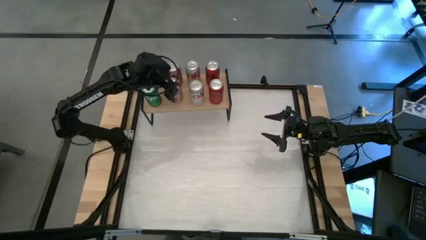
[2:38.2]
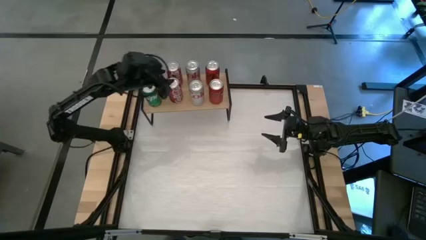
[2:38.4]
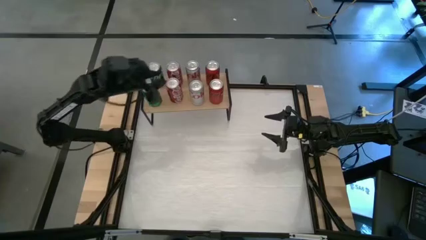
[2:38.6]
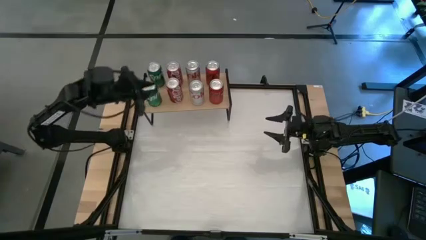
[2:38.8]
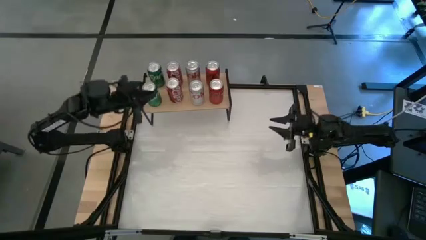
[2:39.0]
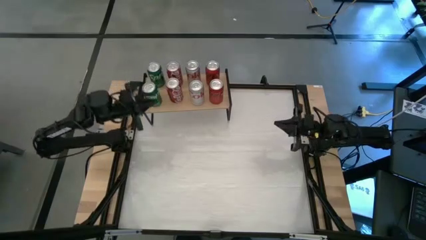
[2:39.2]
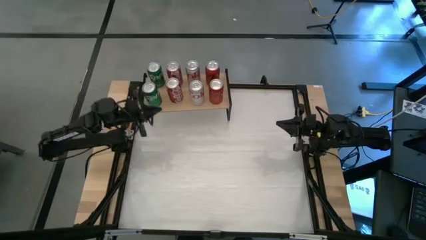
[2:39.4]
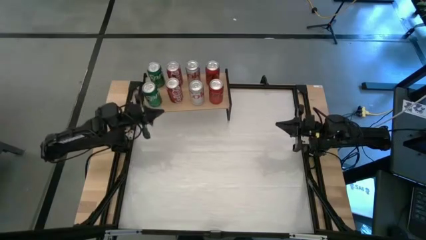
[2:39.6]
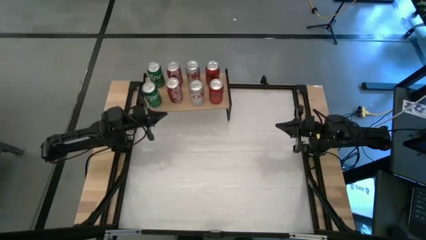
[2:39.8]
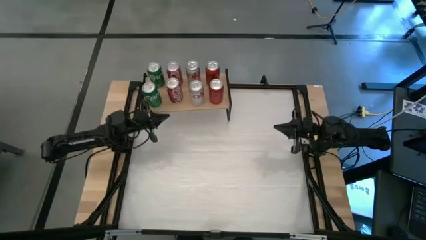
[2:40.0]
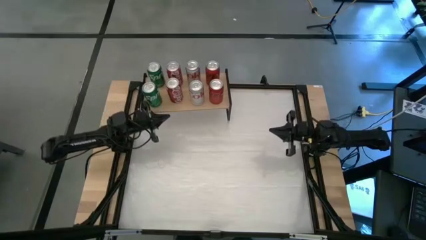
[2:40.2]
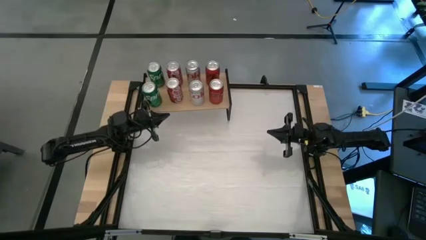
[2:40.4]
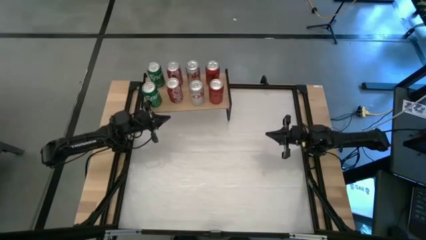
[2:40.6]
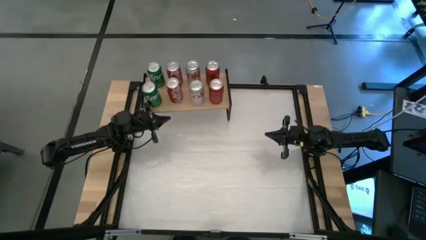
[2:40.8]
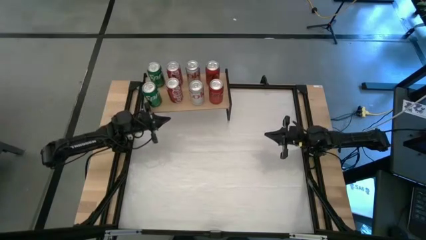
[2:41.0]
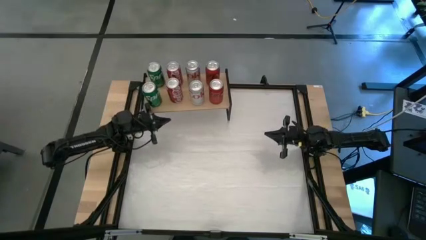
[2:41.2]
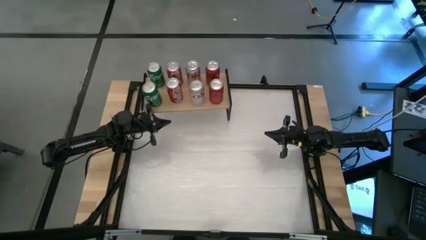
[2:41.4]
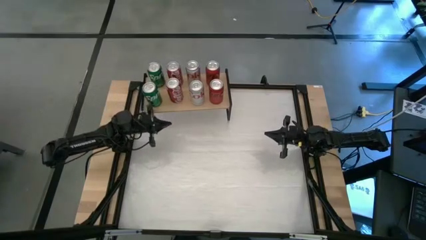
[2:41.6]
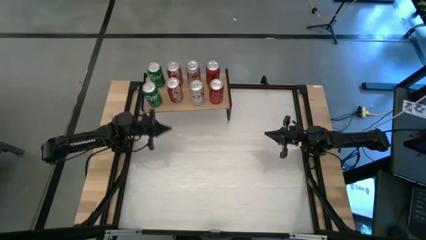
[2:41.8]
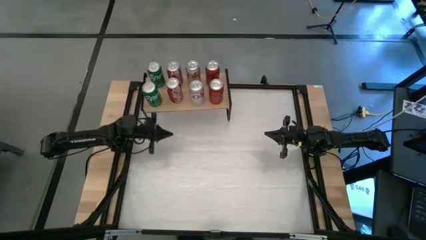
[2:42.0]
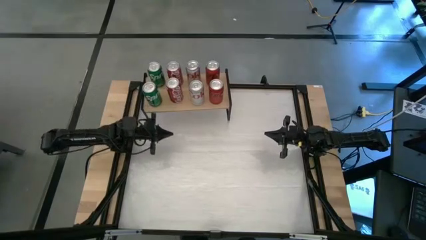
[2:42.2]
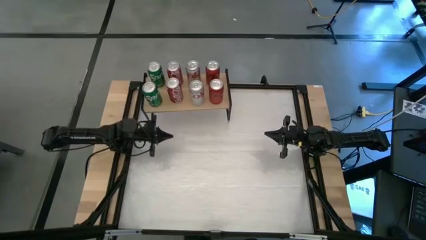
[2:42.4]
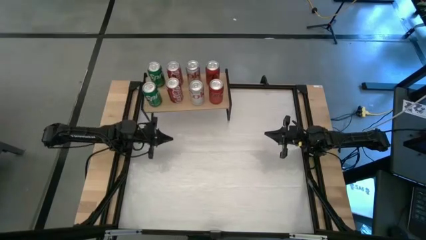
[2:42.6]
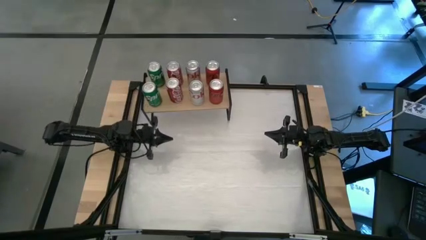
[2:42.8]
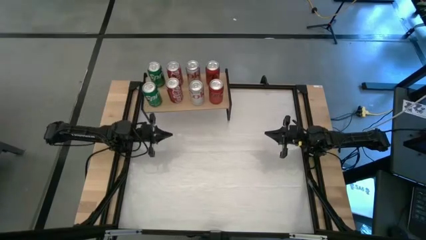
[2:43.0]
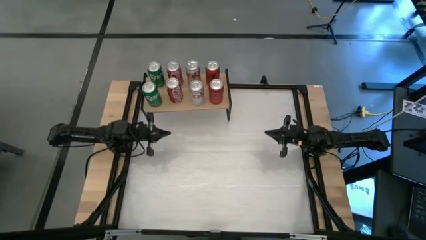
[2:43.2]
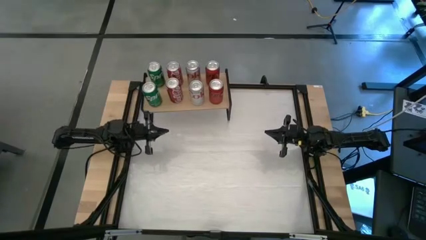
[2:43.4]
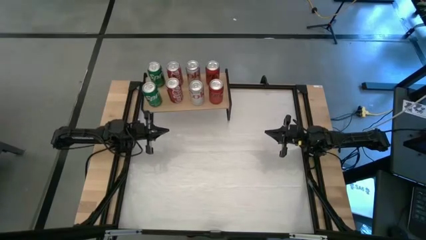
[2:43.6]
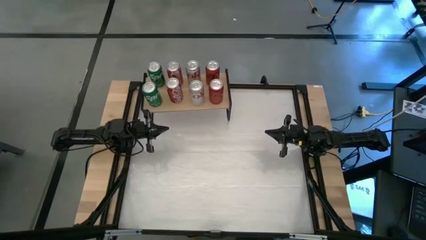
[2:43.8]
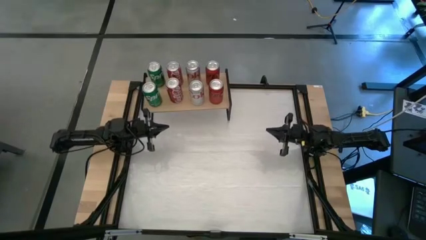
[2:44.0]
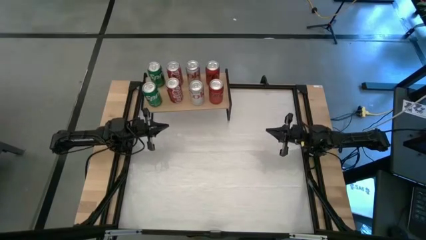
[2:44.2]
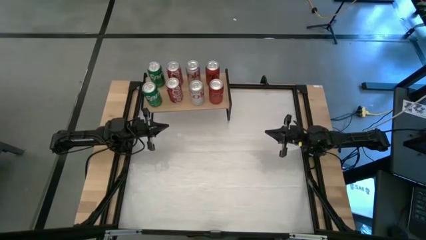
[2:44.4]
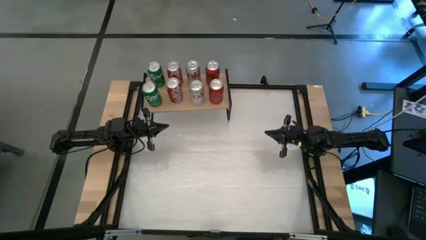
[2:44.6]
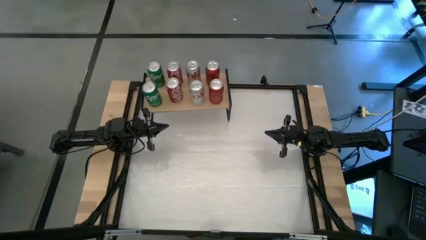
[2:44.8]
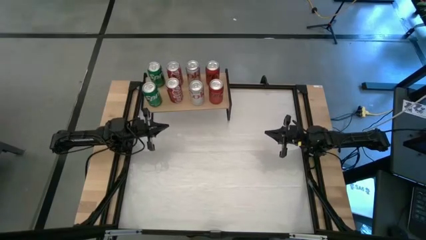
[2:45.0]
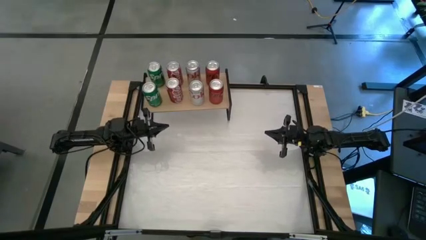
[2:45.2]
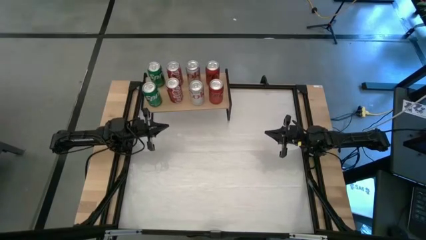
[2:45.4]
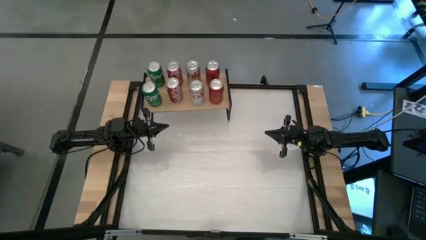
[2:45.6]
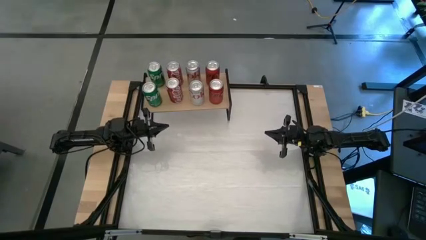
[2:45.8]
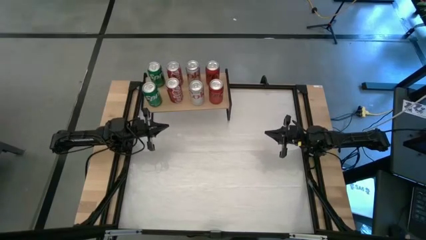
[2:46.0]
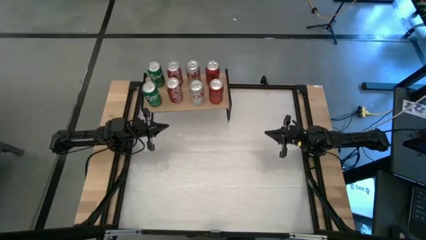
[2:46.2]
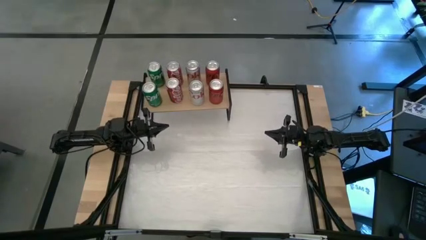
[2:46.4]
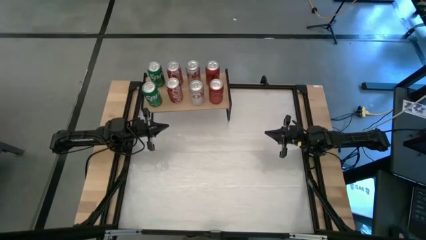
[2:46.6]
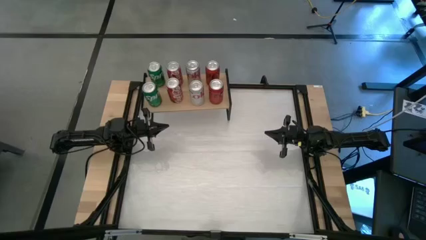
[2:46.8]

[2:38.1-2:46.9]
Task: Place canned beverage on shelf
Return to Home Position

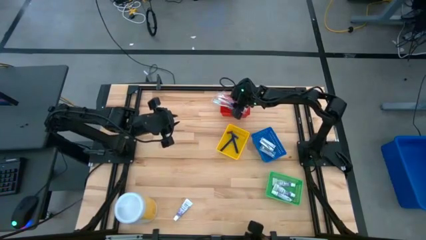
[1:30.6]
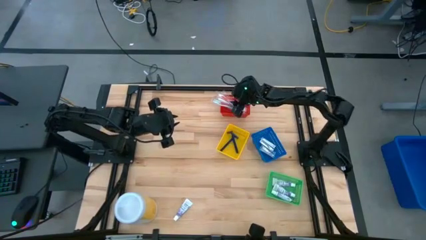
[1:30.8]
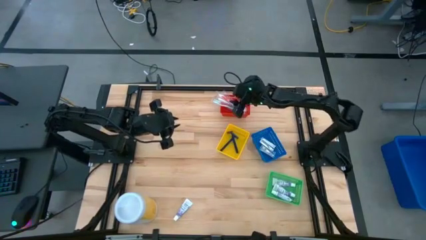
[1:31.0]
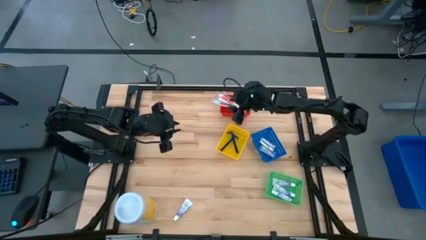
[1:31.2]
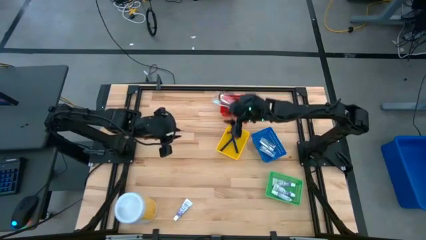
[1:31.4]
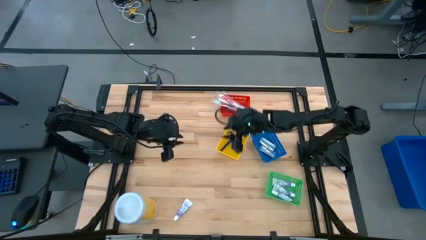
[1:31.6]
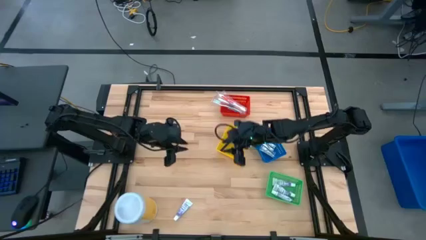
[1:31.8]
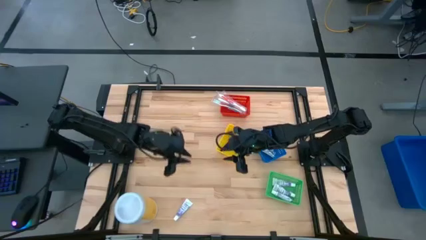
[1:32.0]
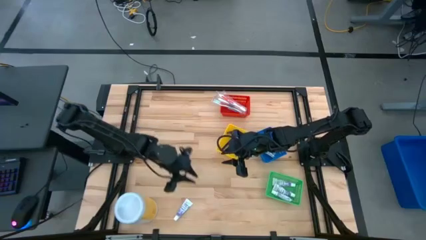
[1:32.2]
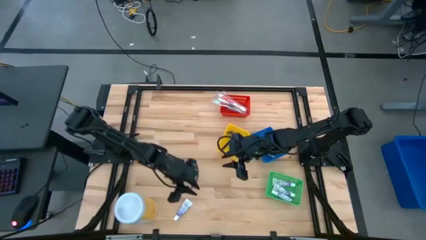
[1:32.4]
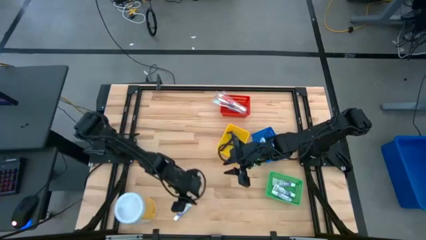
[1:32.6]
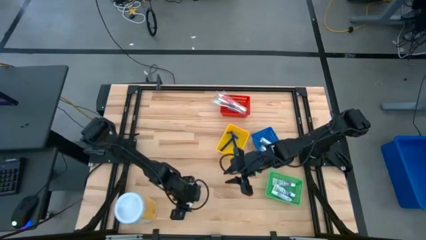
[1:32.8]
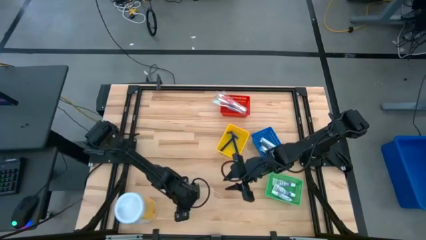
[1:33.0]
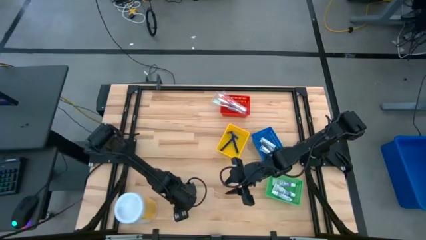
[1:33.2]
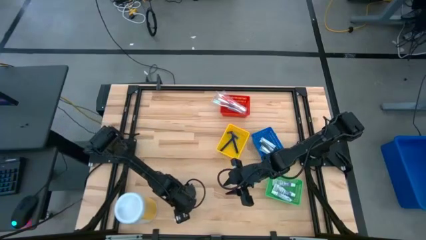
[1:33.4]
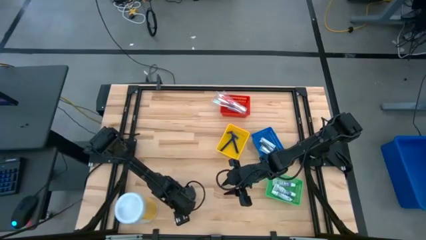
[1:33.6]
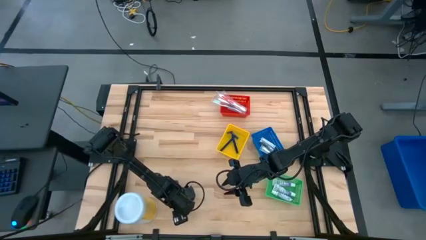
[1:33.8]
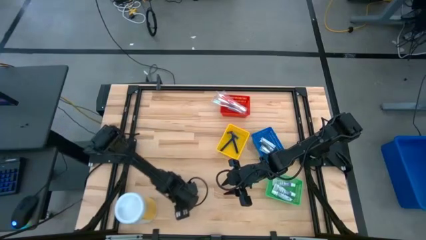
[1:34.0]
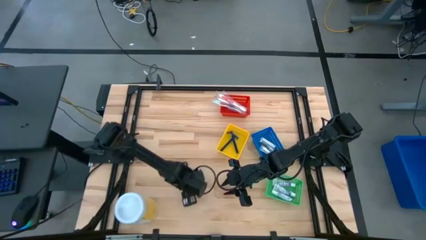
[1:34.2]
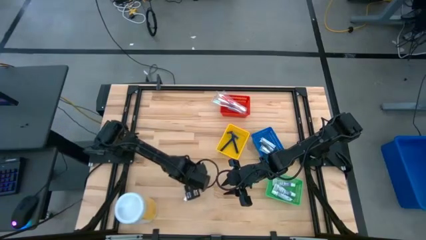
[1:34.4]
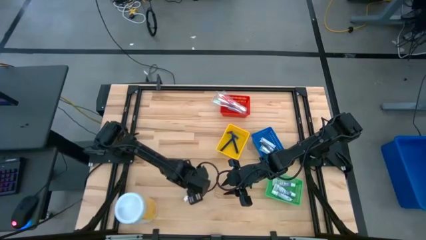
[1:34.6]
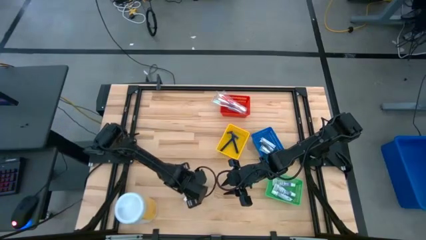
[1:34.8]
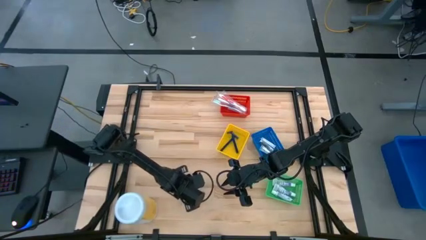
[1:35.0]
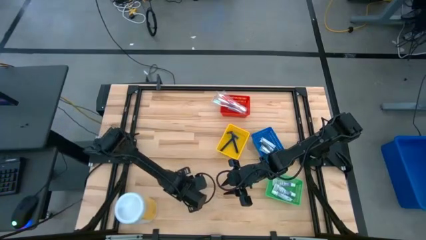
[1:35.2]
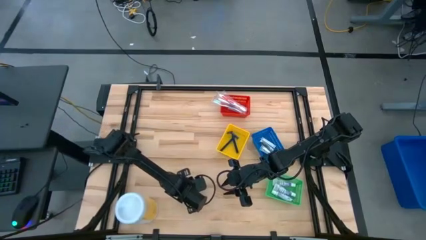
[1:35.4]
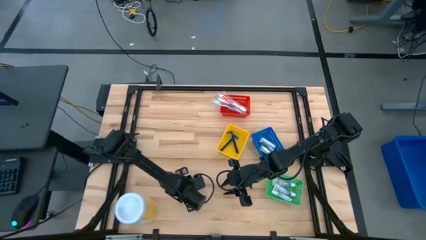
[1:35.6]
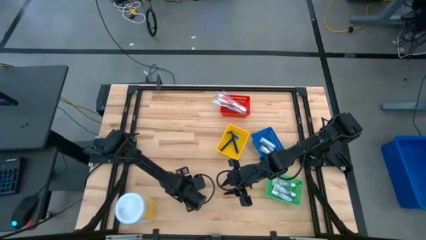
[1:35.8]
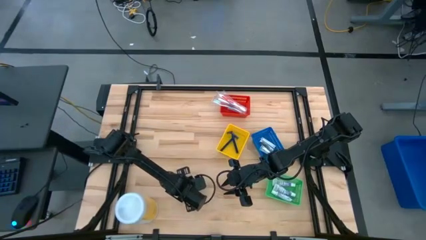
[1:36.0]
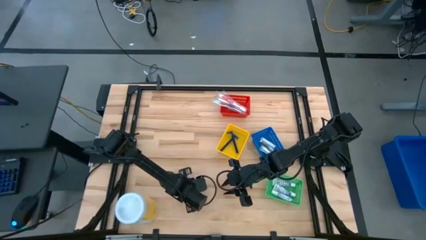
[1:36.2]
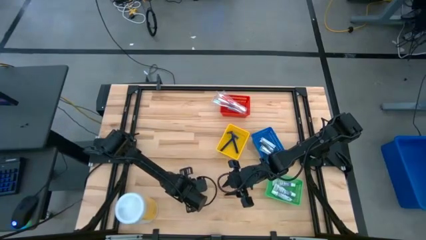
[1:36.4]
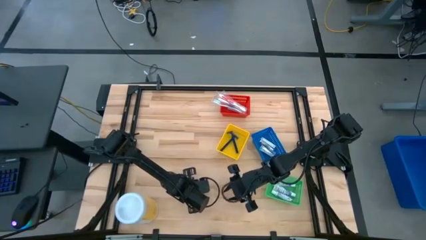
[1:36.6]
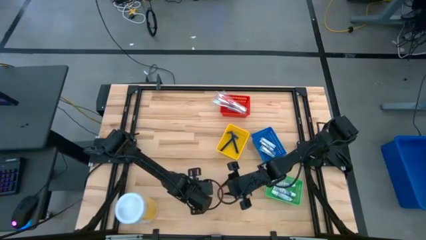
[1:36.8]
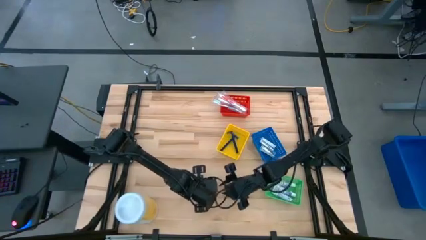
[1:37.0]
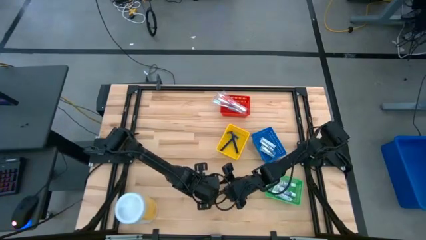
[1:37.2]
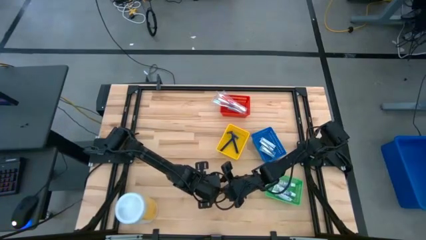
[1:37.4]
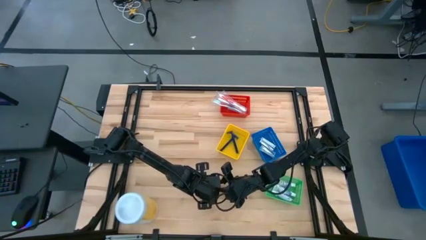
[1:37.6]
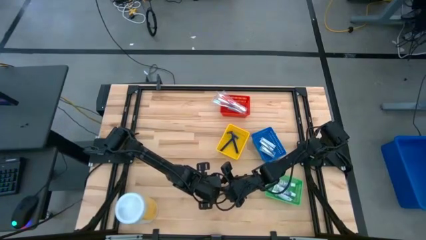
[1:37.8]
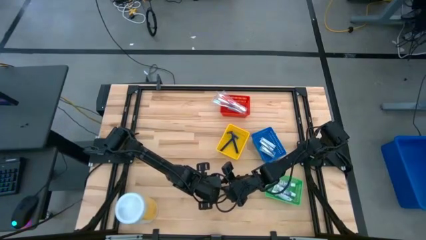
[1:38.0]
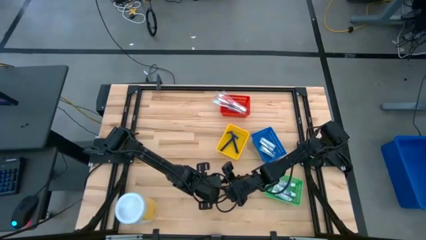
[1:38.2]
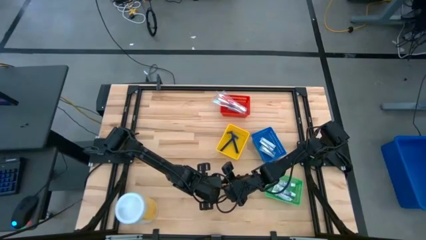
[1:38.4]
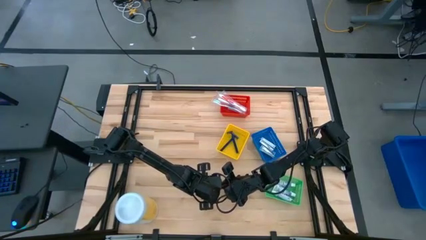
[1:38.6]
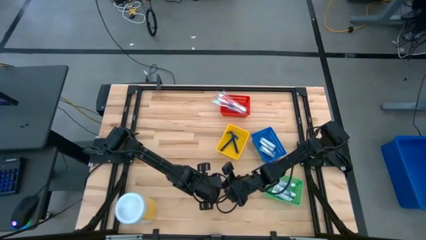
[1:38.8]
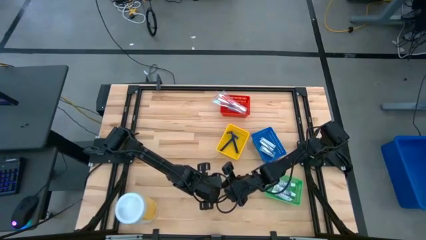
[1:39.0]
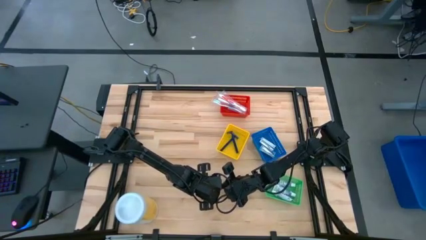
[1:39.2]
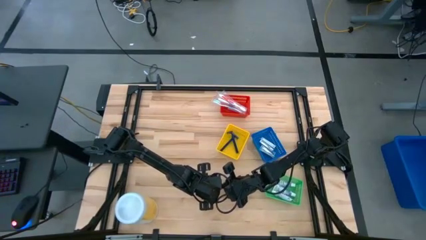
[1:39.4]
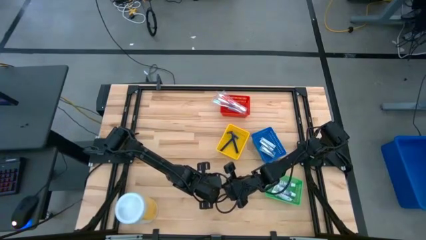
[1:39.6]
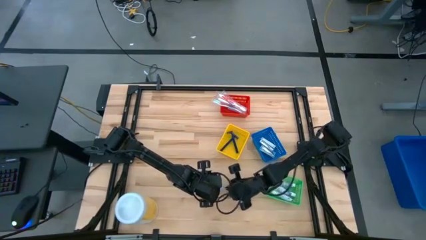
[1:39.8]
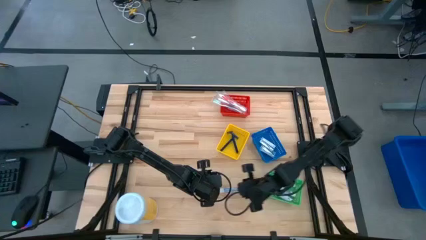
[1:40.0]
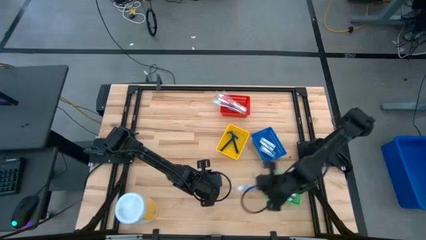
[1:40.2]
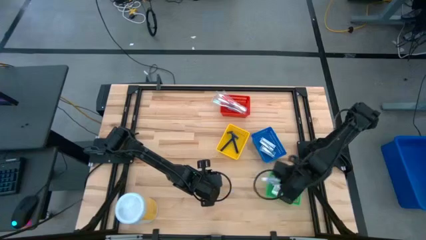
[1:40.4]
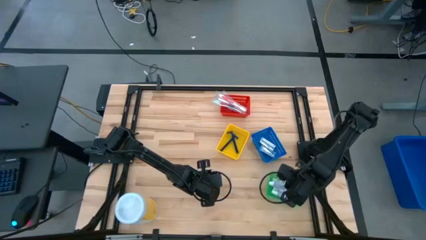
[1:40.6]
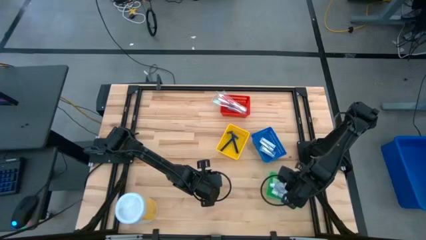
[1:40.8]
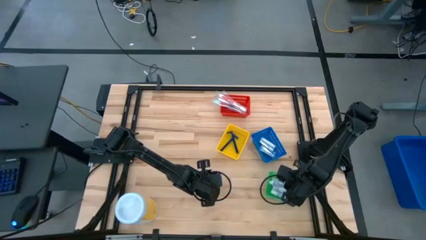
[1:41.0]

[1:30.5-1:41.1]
Task: Pick & Place Travel size toiletries
Put the toothpaste into the green bin
